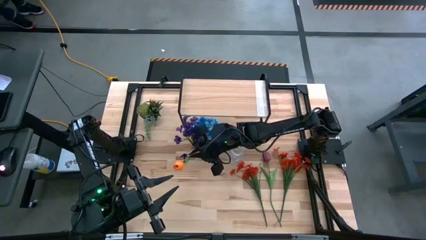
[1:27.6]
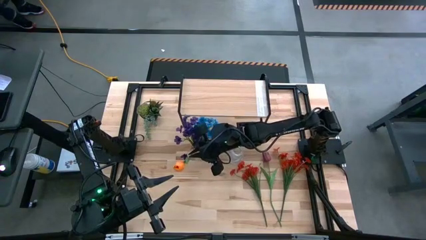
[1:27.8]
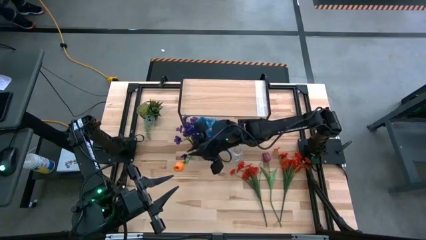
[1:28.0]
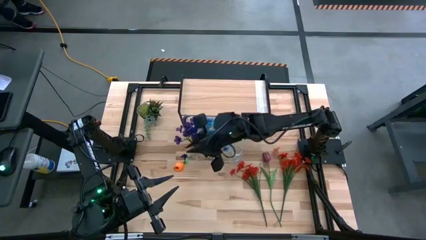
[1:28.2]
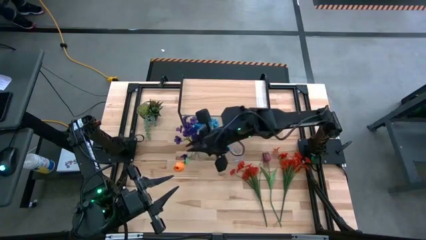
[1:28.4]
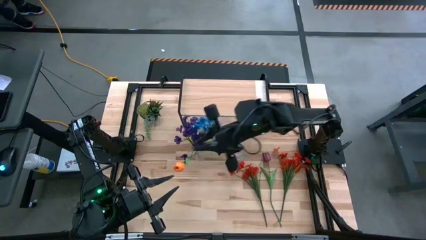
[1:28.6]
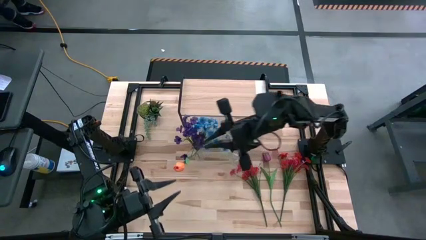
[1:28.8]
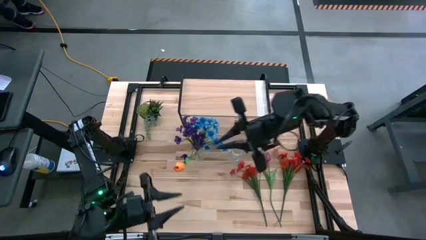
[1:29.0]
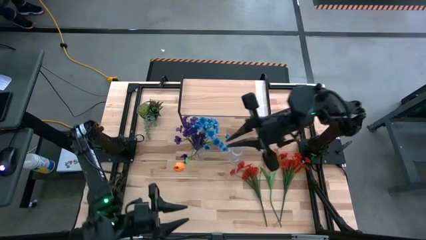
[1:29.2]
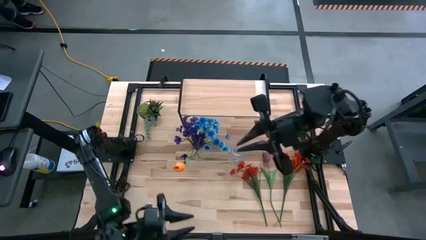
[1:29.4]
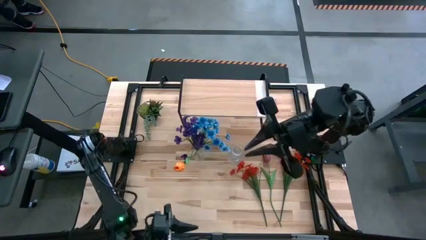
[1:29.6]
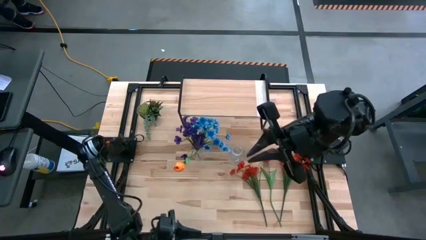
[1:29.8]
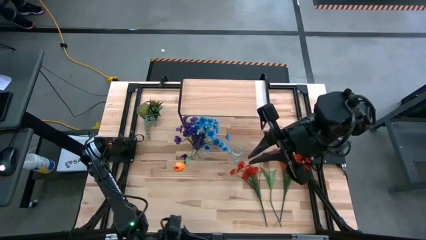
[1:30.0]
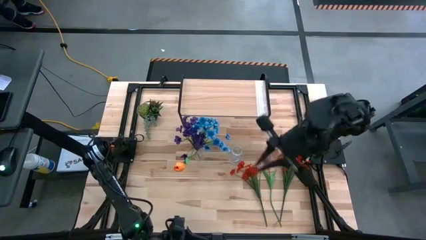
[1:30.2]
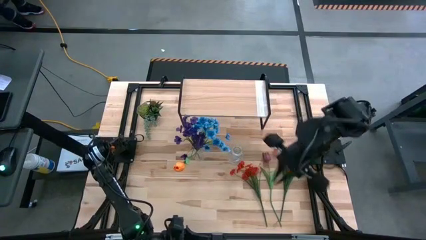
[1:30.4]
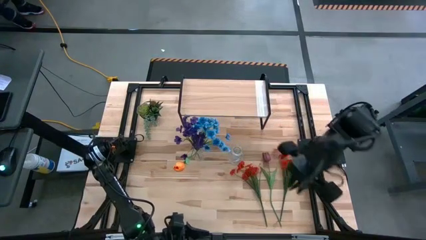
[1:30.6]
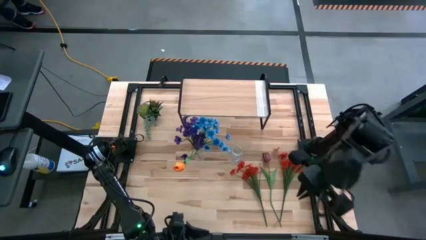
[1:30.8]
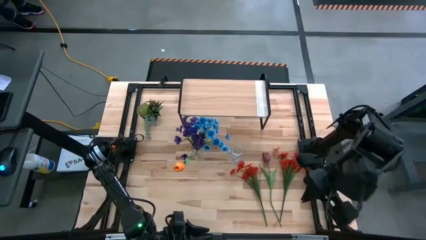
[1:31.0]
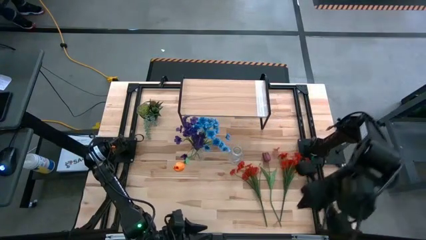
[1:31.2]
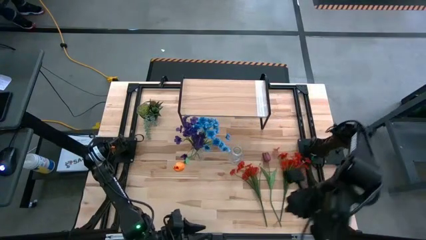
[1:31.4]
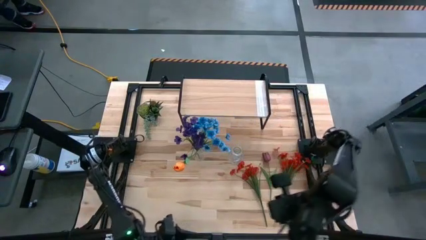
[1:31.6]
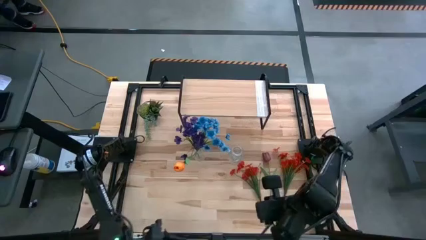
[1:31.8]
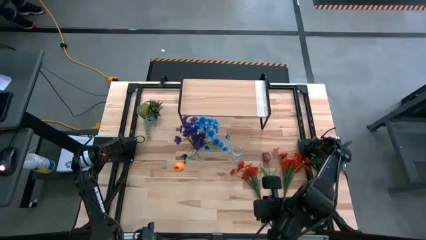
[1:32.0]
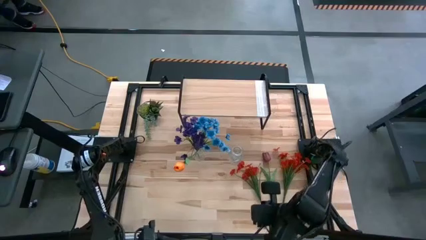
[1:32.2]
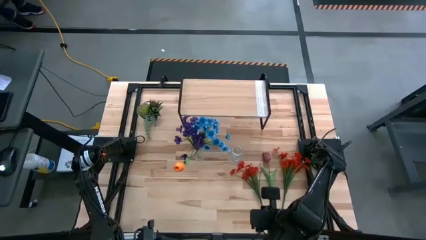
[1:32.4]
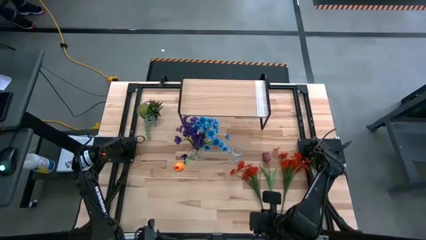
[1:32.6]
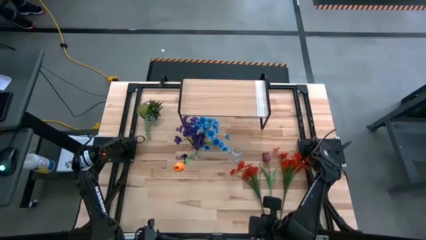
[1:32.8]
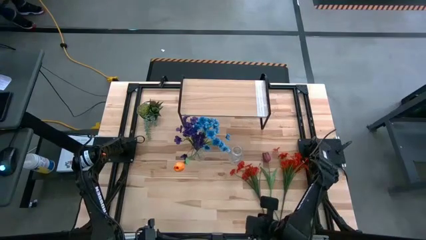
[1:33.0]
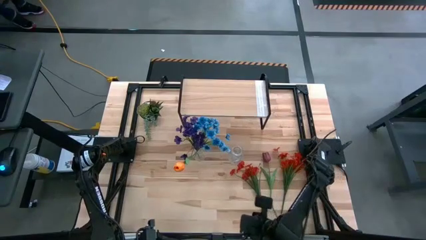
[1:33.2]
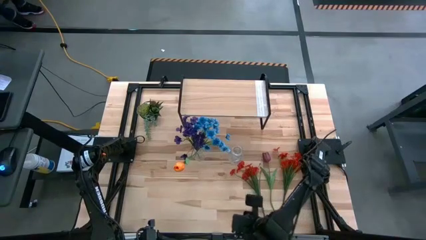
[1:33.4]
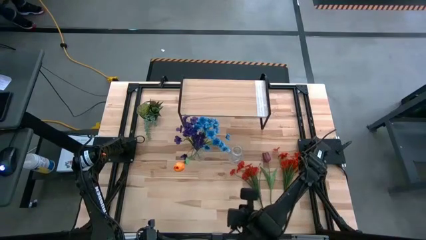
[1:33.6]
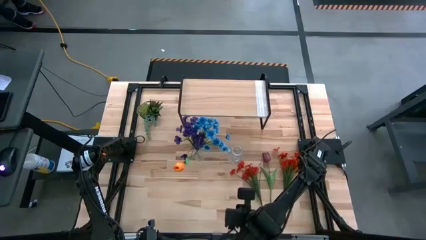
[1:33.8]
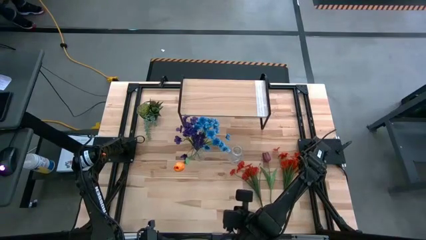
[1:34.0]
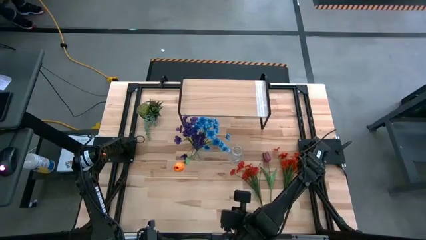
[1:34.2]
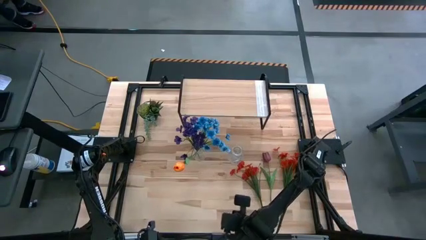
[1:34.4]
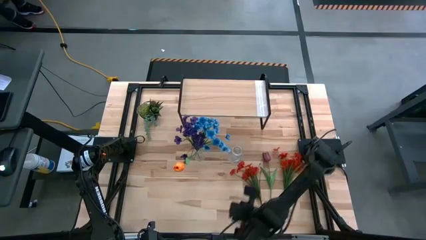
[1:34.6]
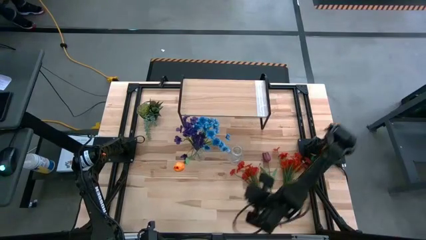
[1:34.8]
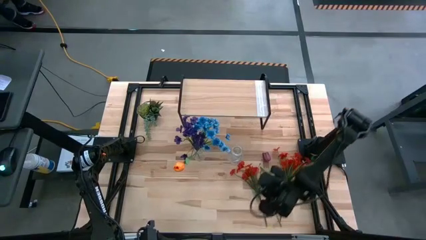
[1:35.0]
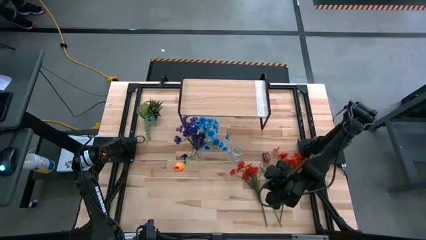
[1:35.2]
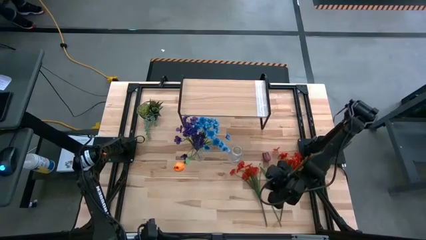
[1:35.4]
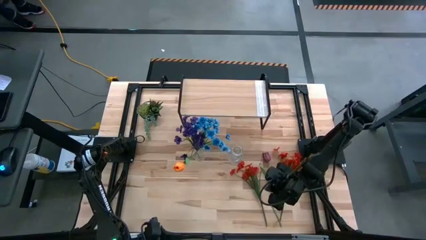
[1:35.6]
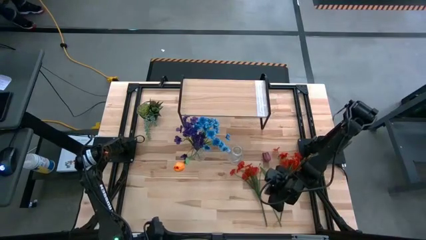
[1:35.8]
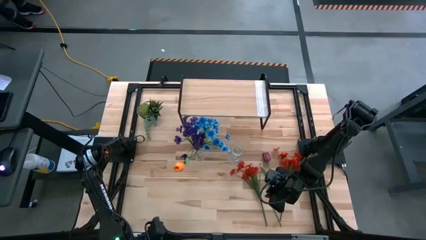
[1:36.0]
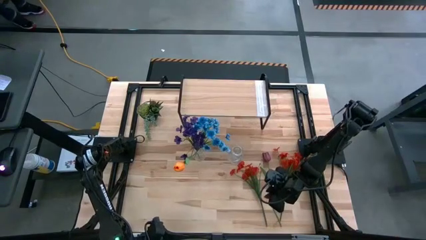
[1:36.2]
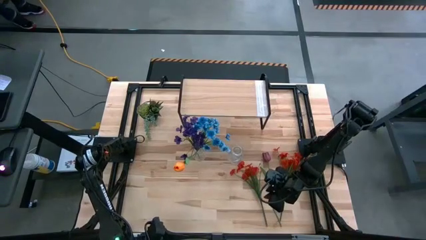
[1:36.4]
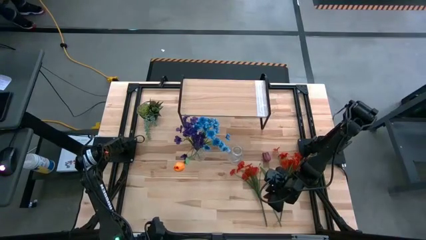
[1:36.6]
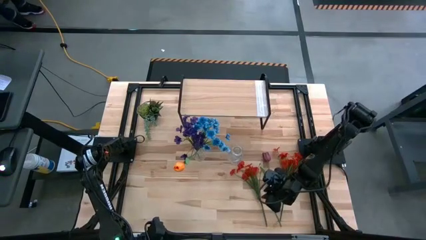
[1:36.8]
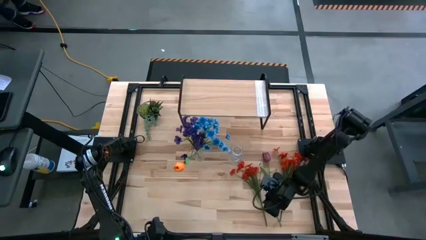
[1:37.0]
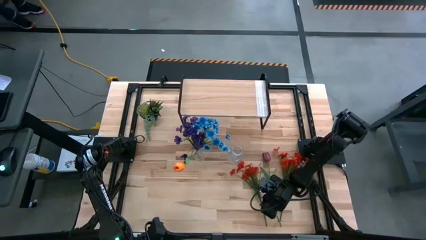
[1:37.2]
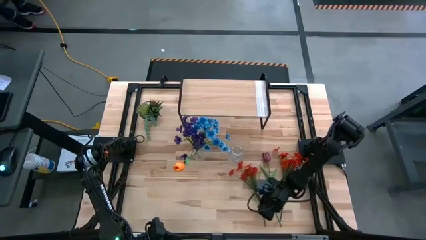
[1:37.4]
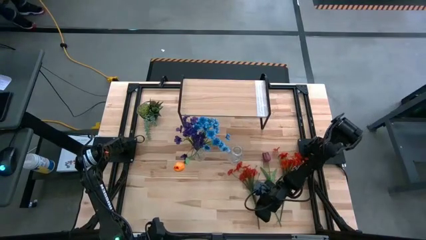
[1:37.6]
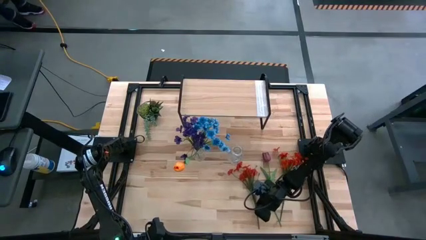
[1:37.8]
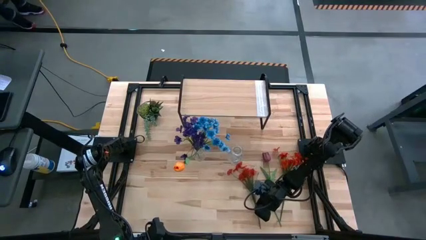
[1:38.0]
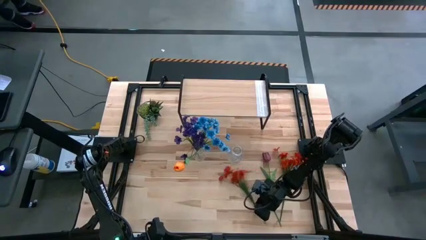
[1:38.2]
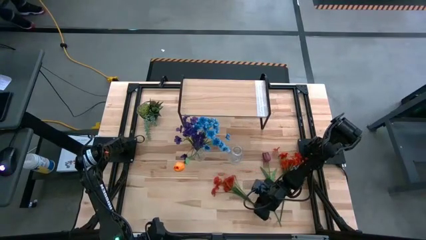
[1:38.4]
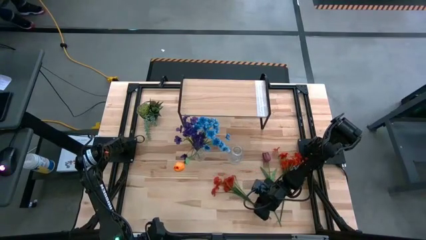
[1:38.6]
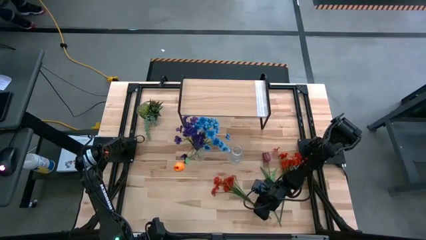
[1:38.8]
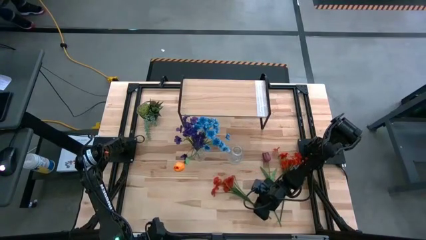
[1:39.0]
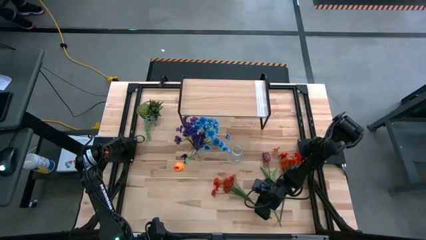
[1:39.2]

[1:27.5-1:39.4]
Task: Pick and place flowers into a vace then onto a shelf
Put the left red flower into the right transparent crystal vase
